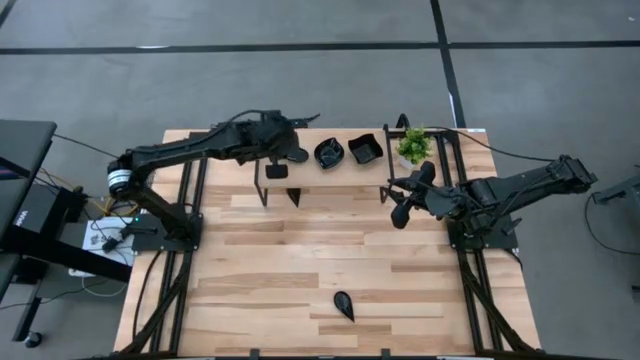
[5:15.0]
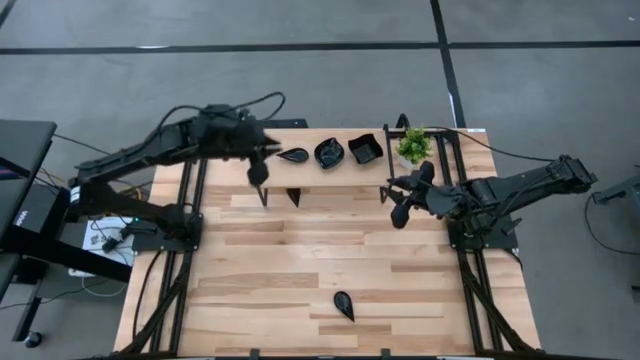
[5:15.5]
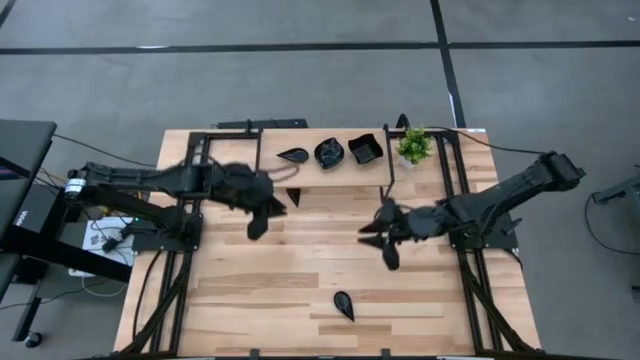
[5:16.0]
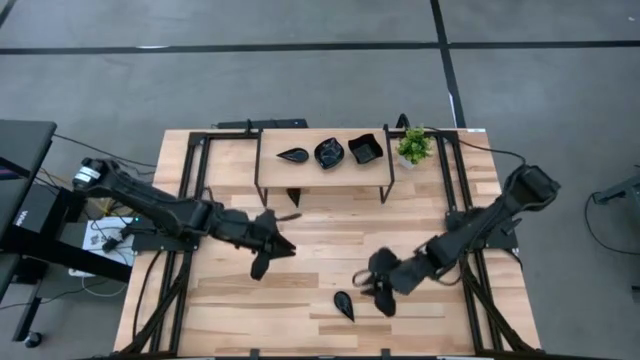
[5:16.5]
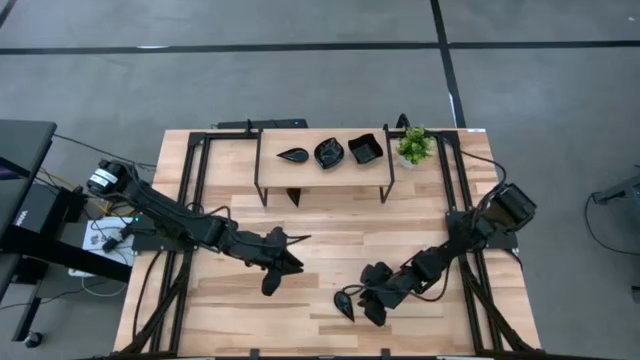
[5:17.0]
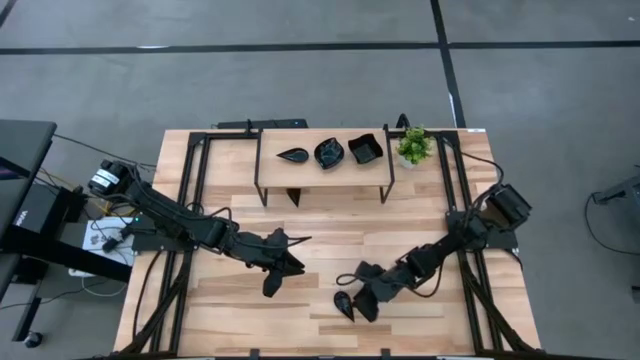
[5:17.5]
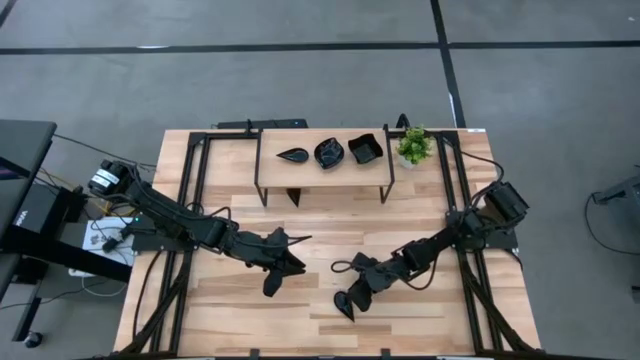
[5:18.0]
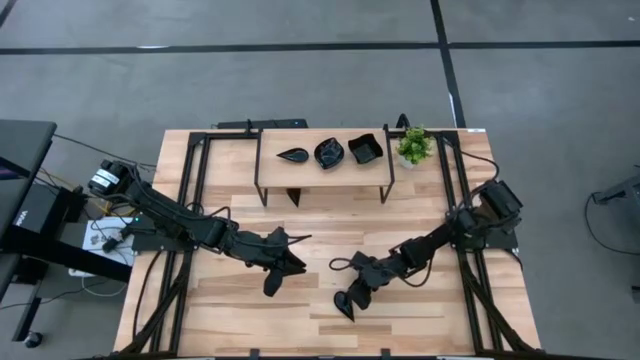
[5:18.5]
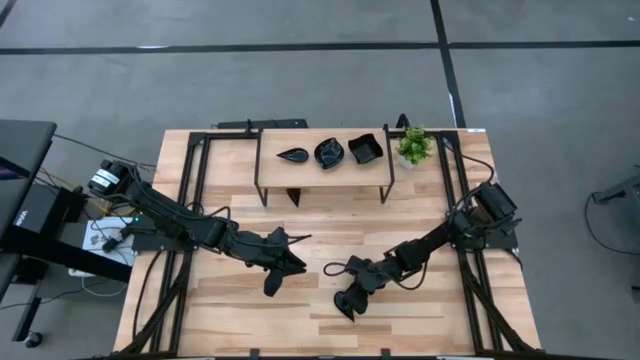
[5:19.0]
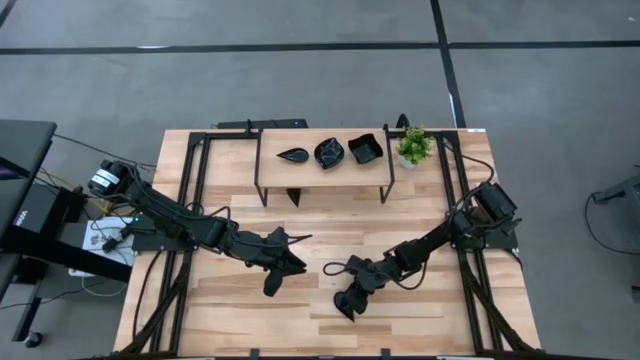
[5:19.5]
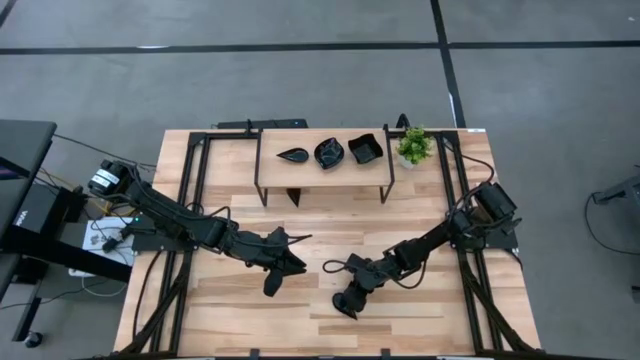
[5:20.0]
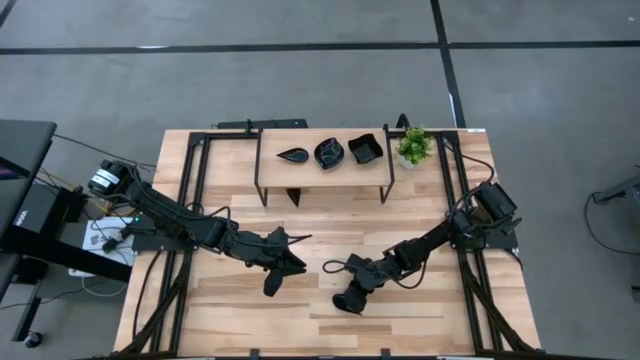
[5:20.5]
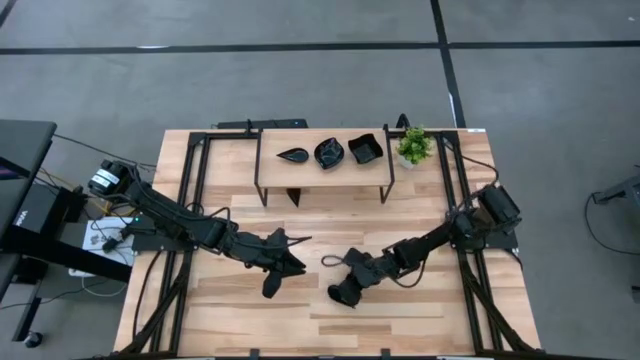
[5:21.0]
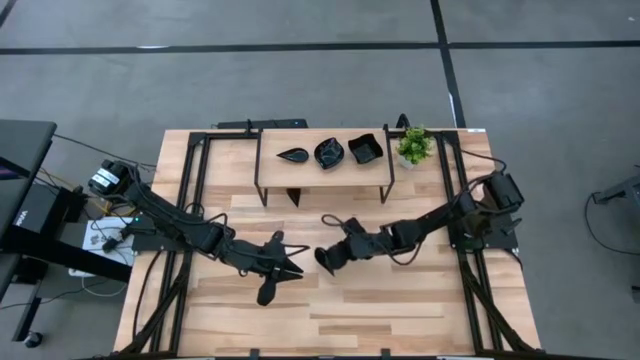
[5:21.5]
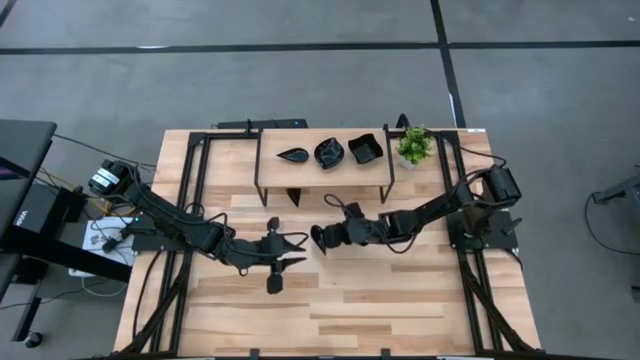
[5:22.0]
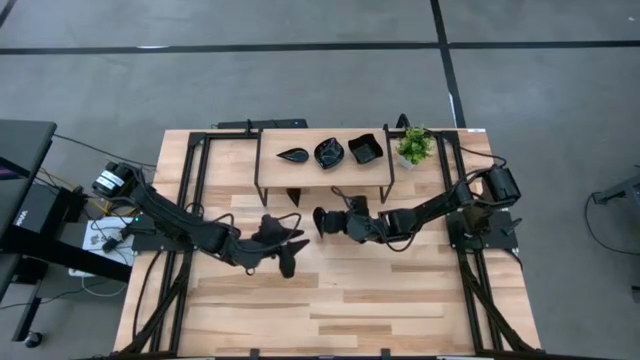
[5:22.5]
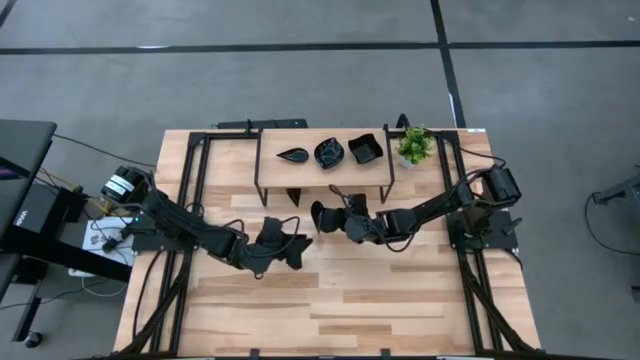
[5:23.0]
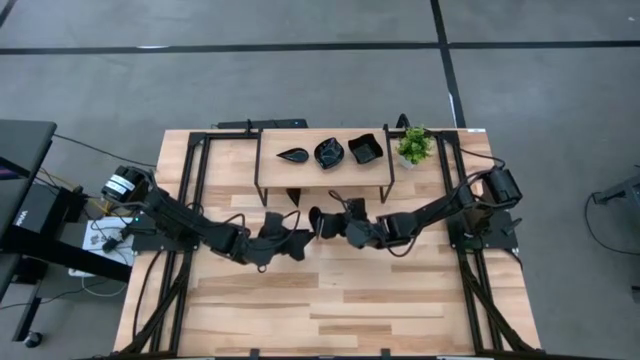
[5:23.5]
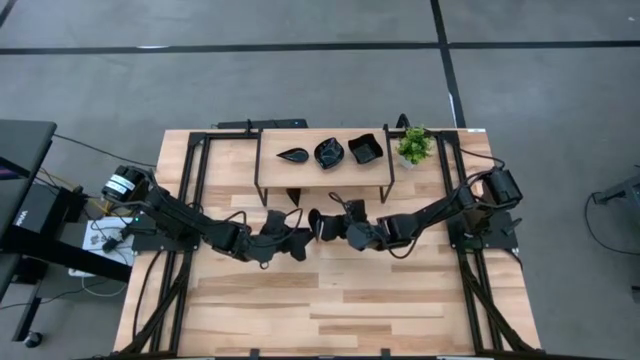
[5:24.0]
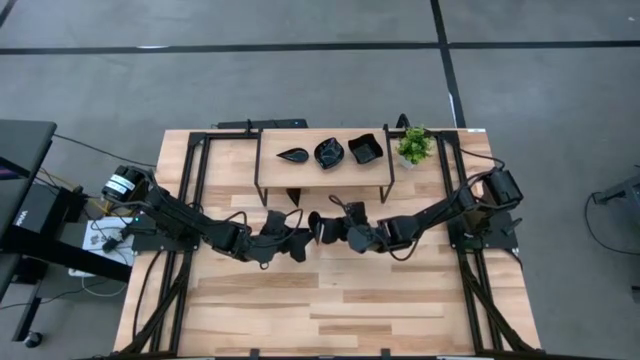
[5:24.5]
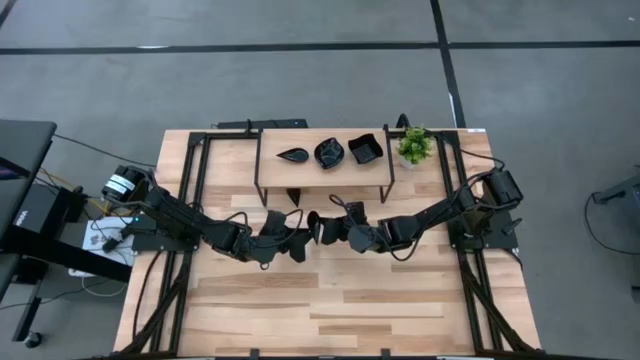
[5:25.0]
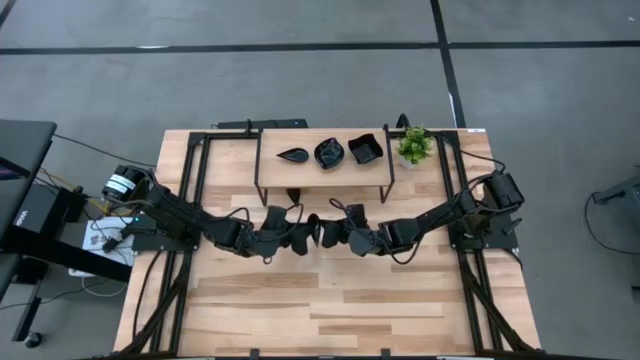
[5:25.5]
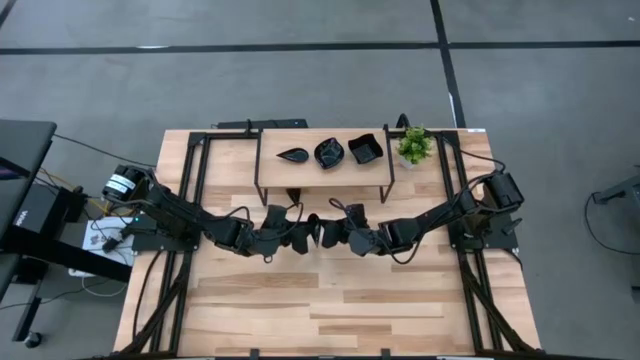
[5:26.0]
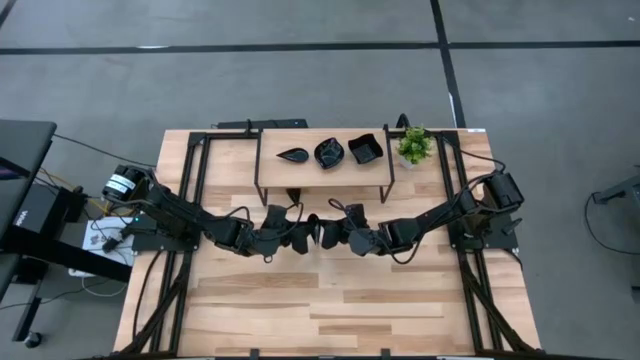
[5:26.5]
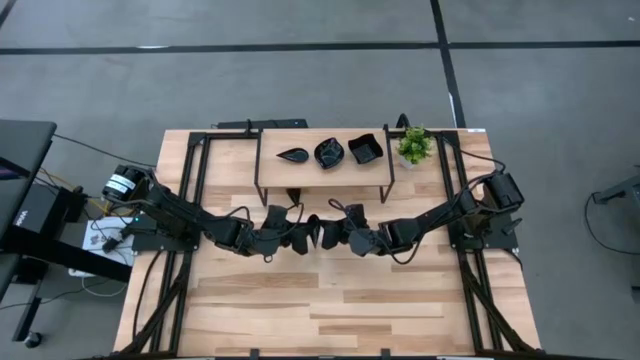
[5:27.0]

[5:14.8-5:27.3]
Task: Pick & Place Mini shaped plates
Stack the black drop shaped plate on the black drop shaped plate on the shelf

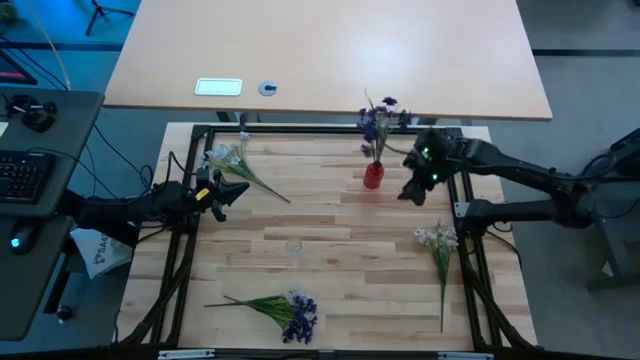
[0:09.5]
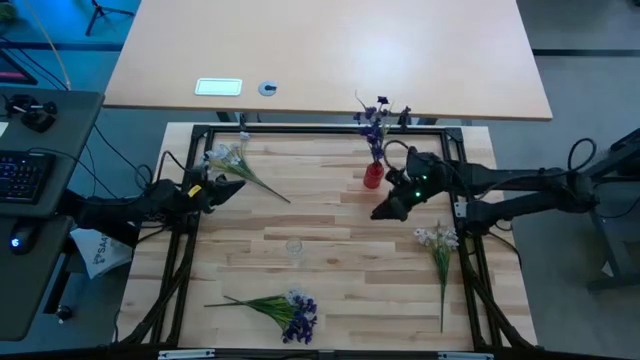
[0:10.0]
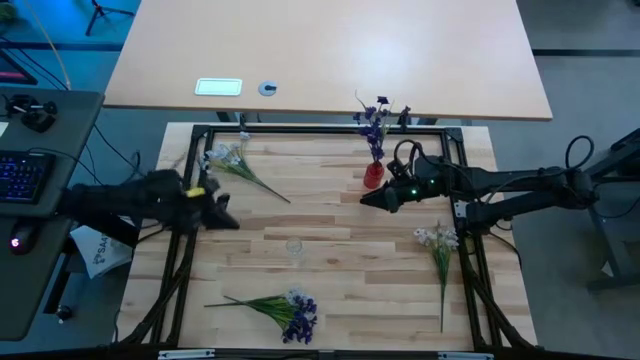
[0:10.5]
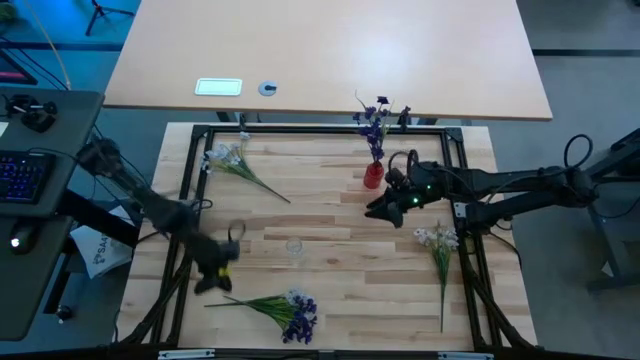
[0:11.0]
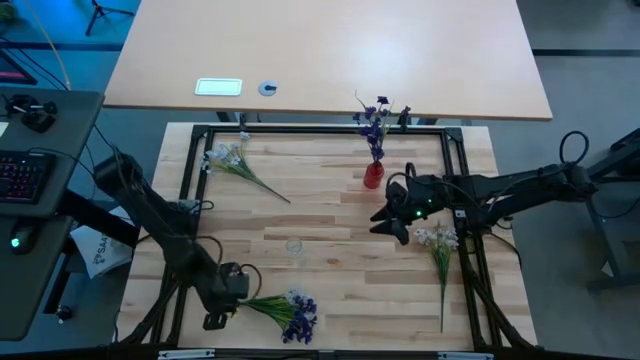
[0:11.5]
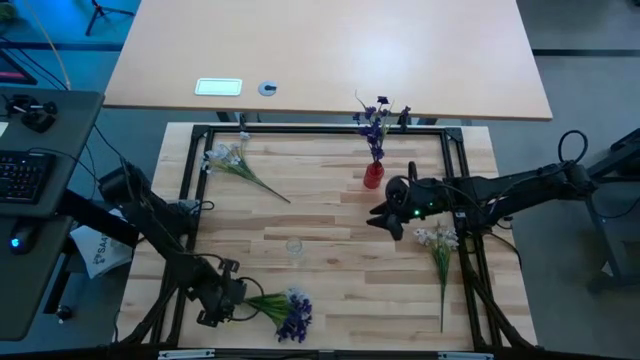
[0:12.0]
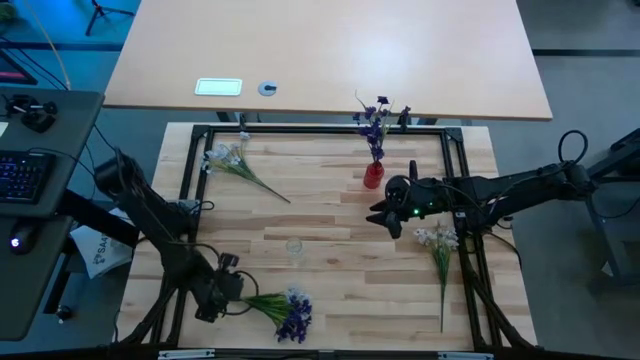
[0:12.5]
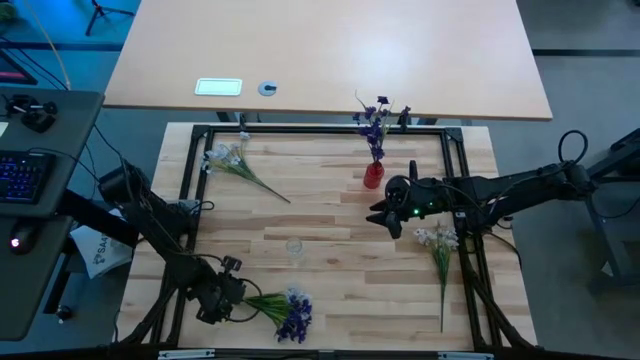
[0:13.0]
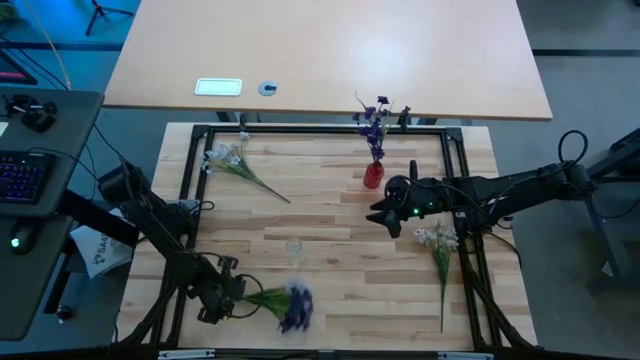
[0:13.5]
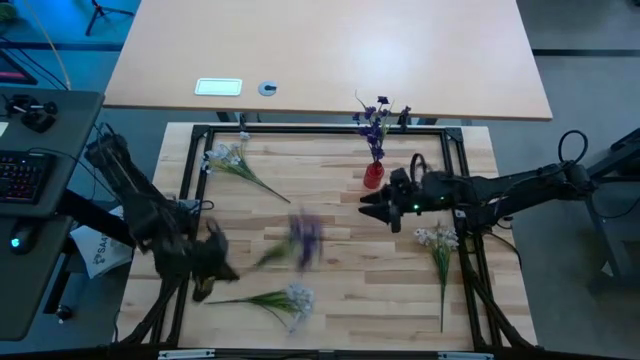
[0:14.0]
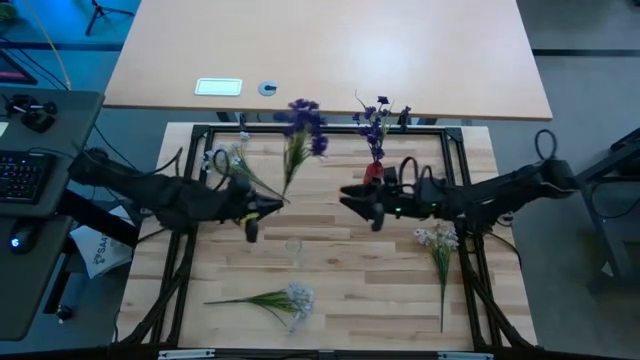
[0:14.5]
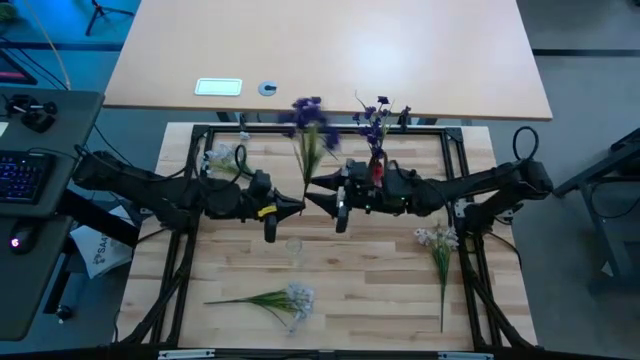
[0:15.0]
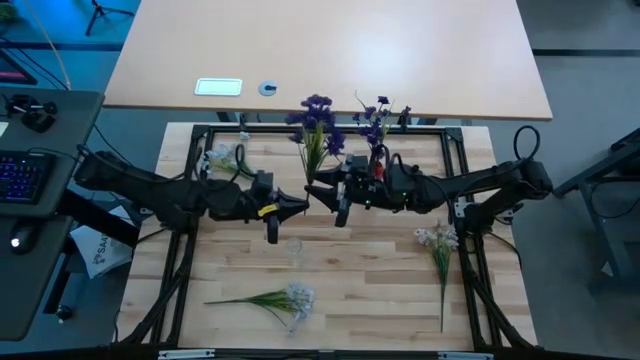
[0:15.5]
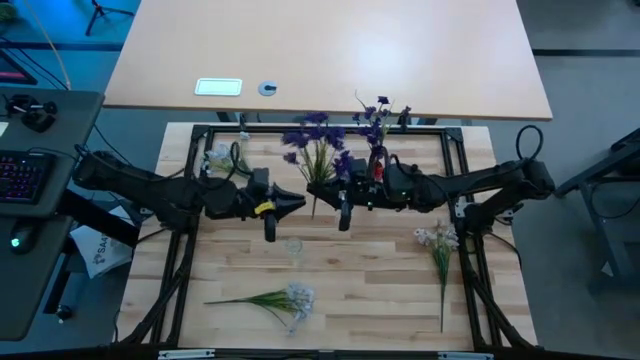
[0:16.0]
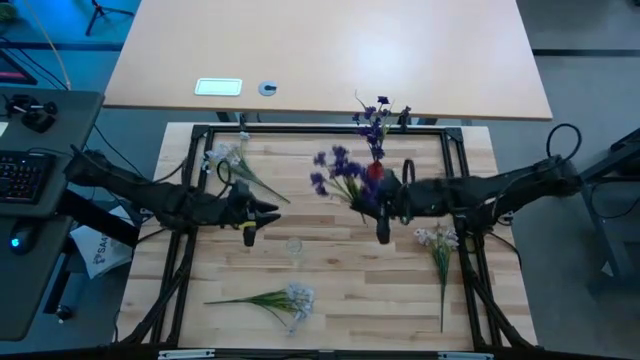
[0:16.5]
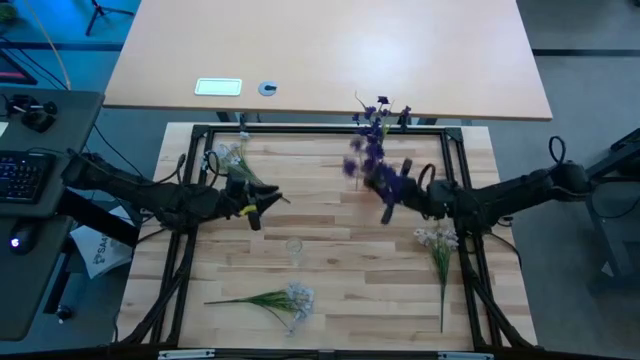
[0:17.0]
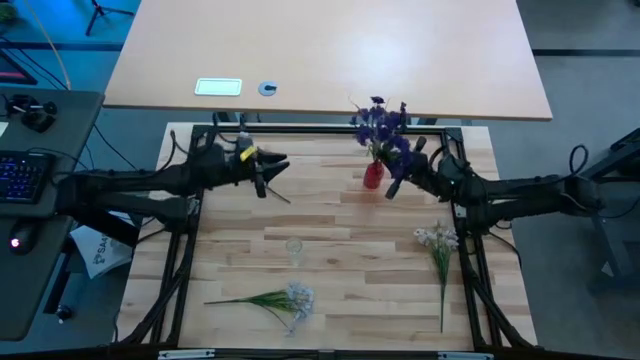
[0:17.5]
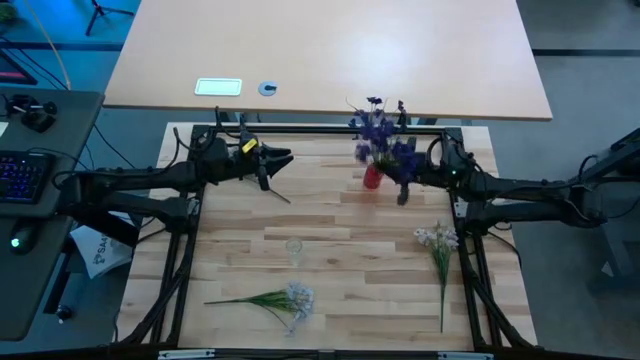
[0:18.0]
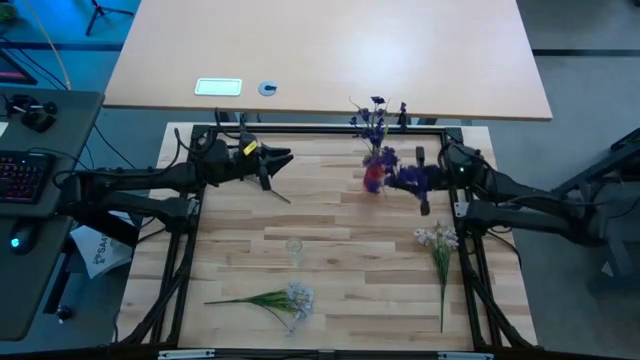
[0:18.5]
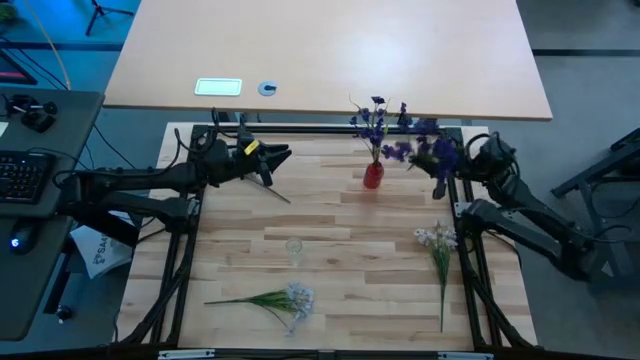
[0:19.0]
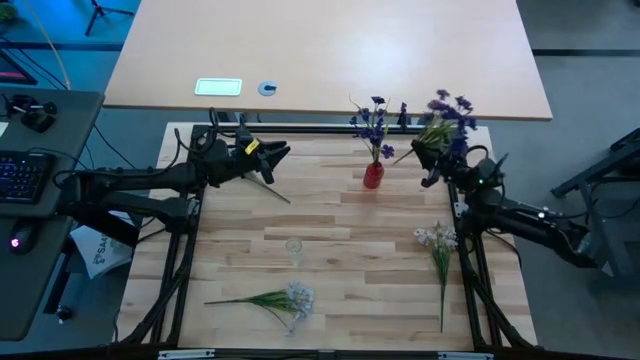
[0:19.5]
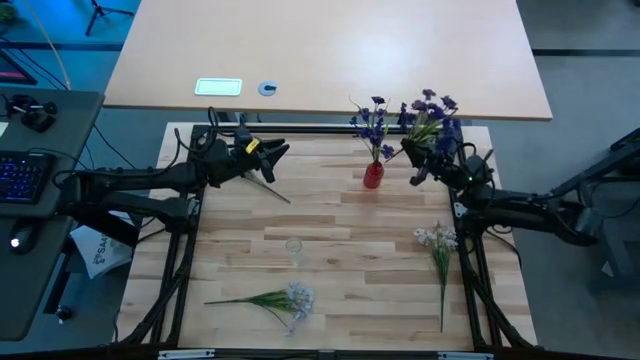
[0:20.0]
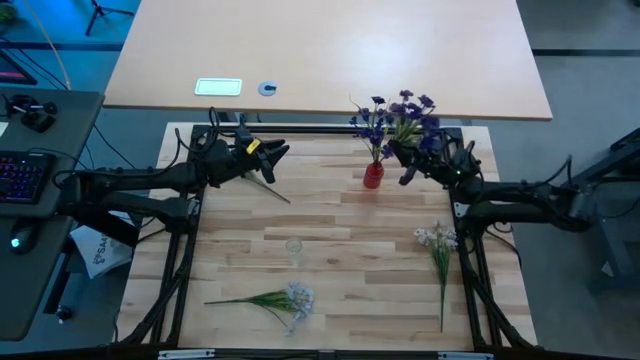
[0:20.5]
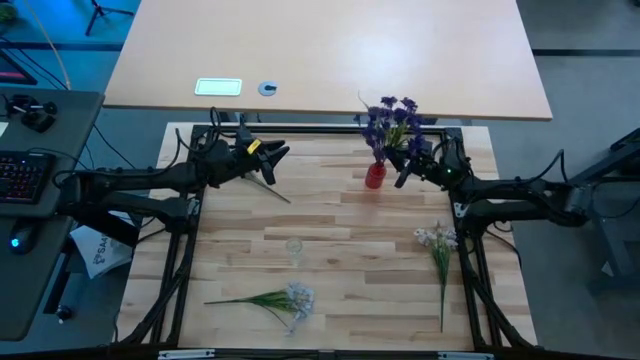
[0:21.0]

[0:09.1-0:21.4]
Task: Sort flowers into vase by color
Put the blue flowers into the red crystal vase
